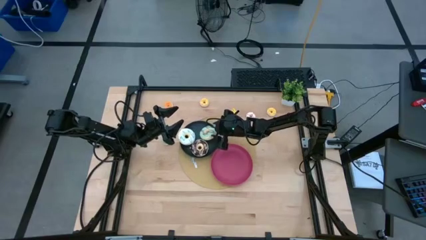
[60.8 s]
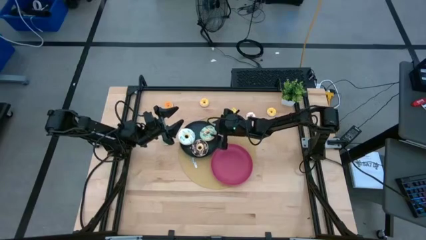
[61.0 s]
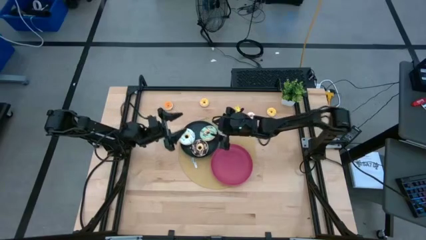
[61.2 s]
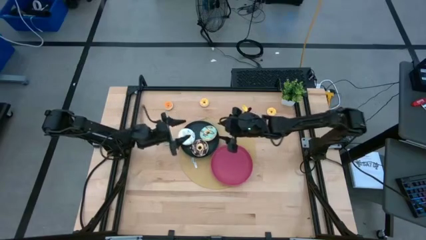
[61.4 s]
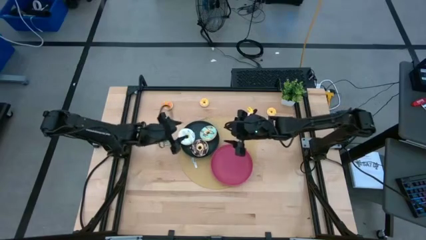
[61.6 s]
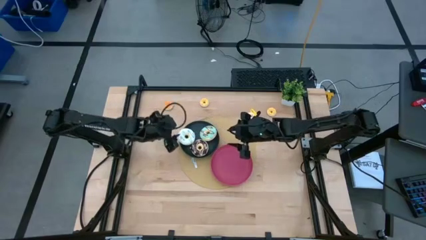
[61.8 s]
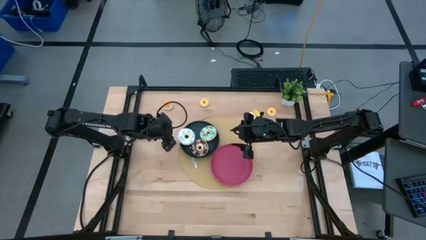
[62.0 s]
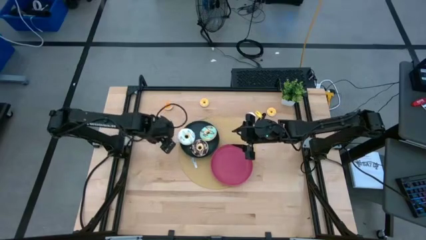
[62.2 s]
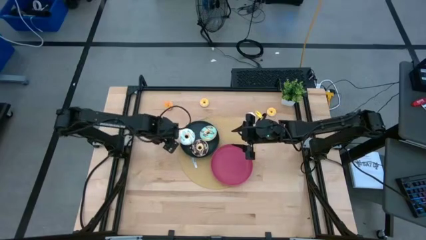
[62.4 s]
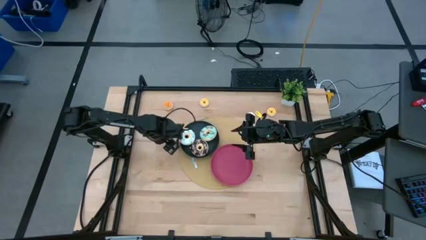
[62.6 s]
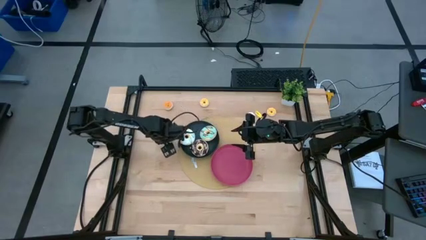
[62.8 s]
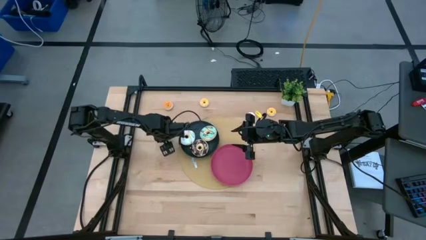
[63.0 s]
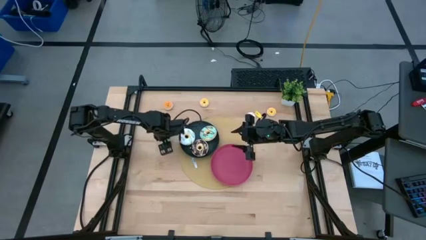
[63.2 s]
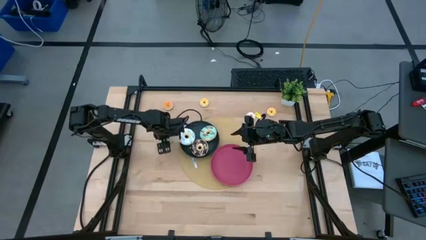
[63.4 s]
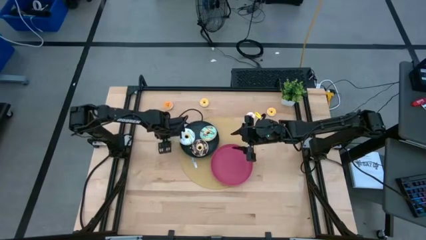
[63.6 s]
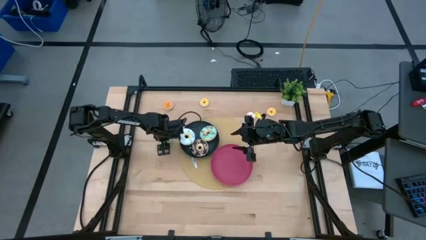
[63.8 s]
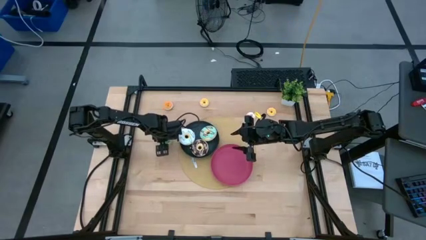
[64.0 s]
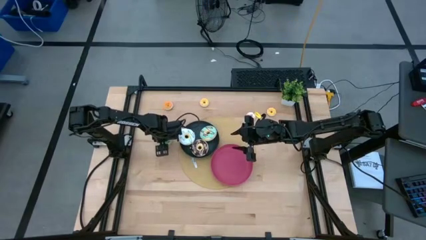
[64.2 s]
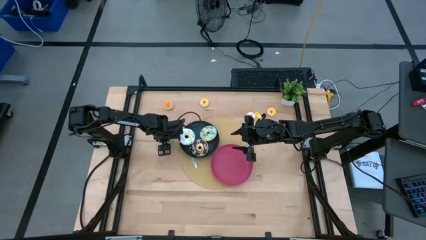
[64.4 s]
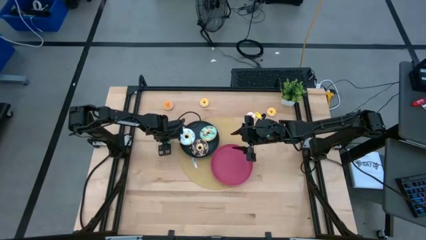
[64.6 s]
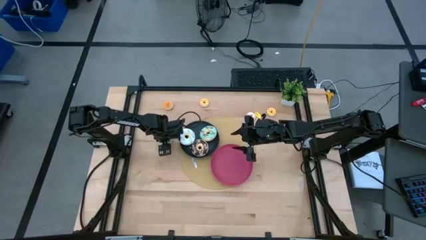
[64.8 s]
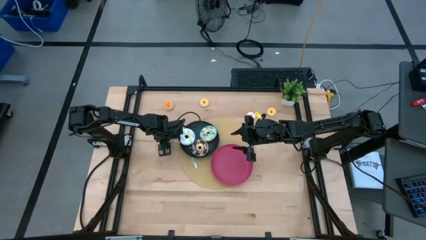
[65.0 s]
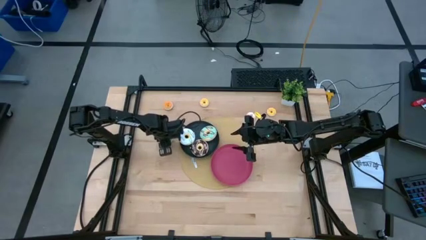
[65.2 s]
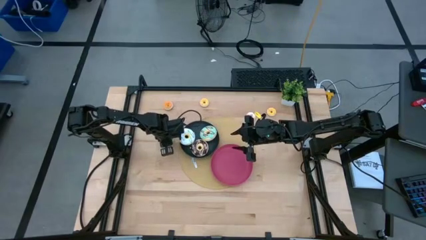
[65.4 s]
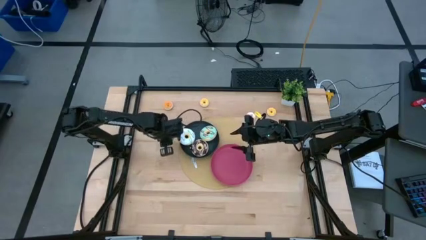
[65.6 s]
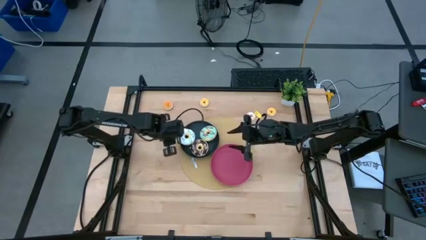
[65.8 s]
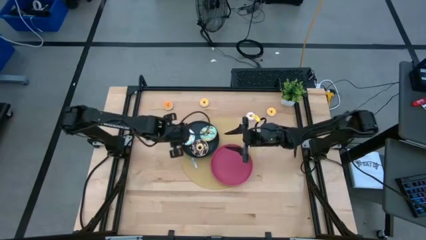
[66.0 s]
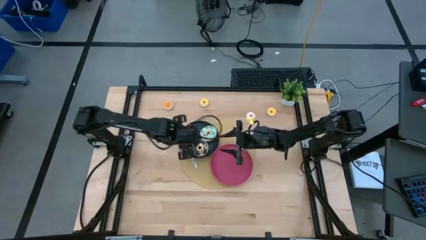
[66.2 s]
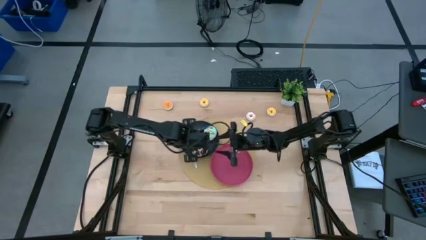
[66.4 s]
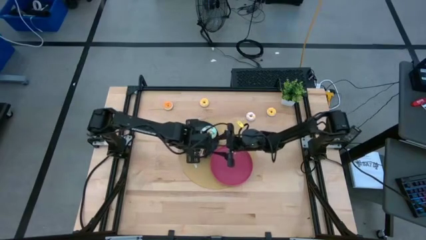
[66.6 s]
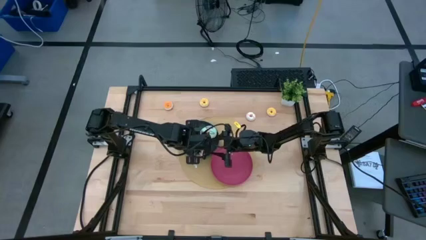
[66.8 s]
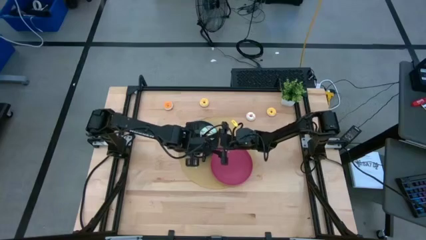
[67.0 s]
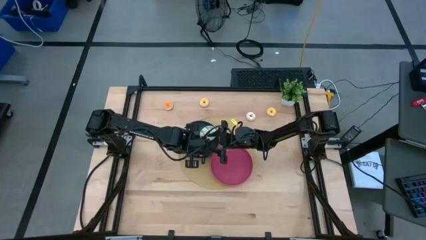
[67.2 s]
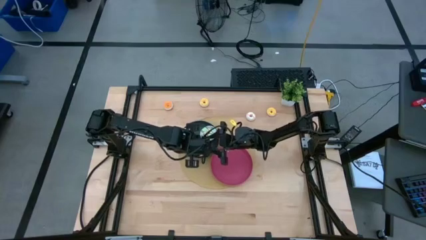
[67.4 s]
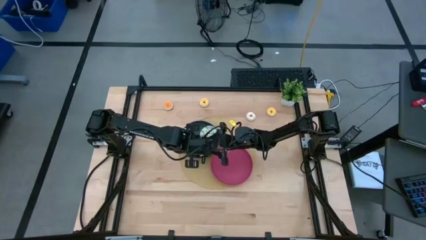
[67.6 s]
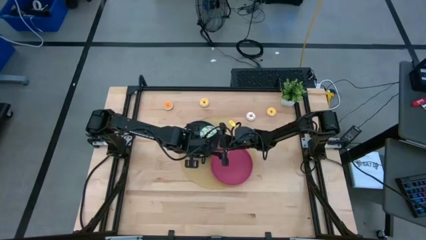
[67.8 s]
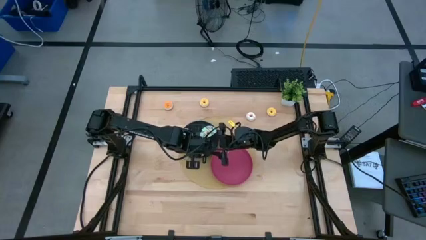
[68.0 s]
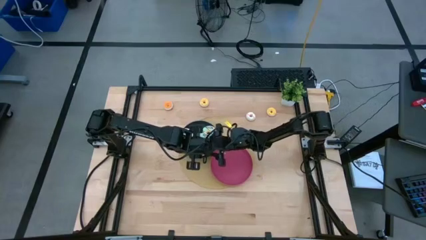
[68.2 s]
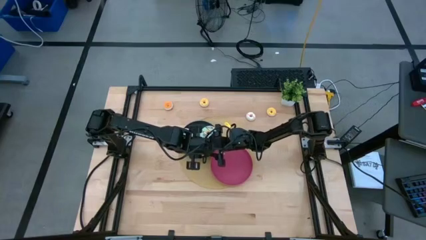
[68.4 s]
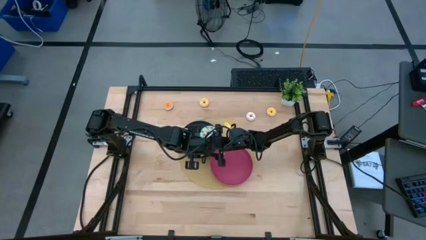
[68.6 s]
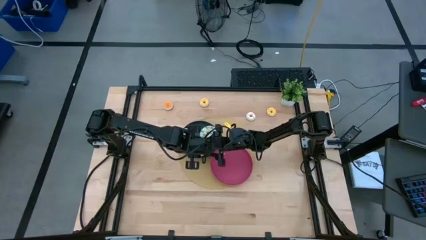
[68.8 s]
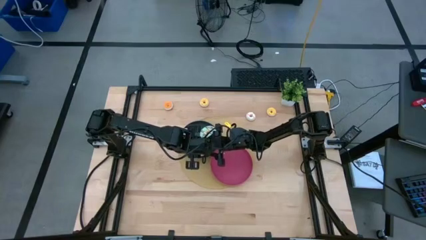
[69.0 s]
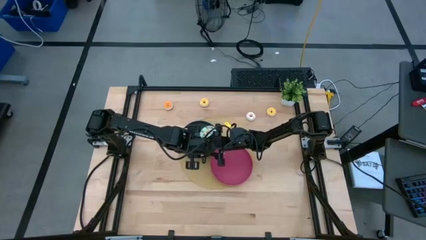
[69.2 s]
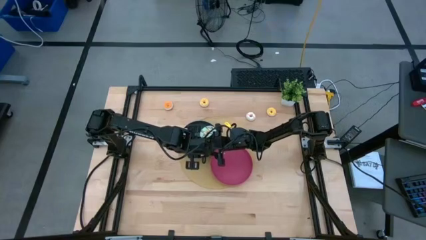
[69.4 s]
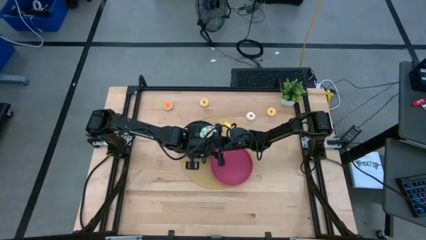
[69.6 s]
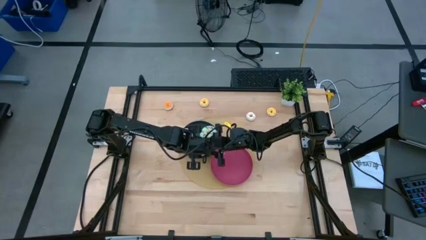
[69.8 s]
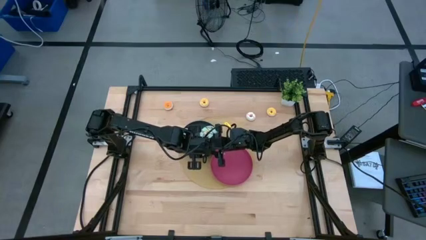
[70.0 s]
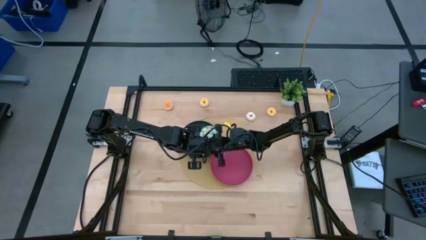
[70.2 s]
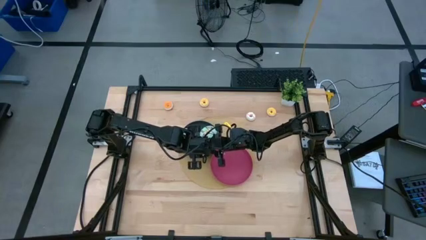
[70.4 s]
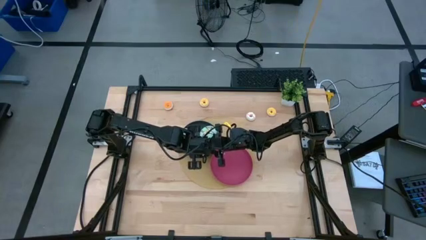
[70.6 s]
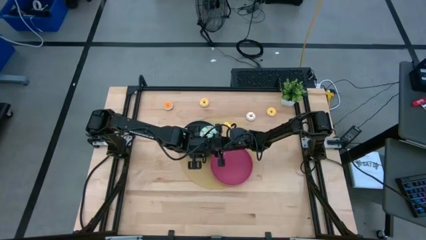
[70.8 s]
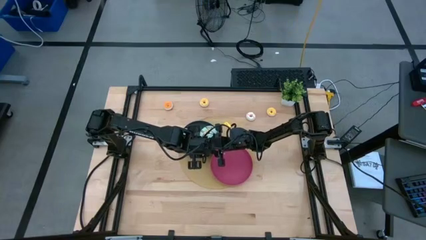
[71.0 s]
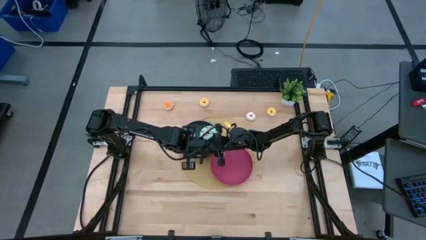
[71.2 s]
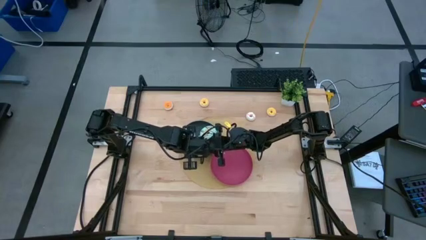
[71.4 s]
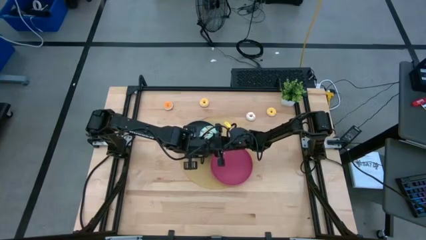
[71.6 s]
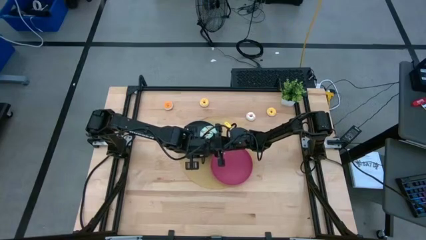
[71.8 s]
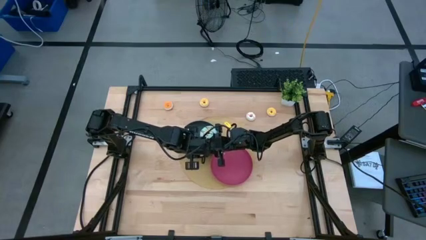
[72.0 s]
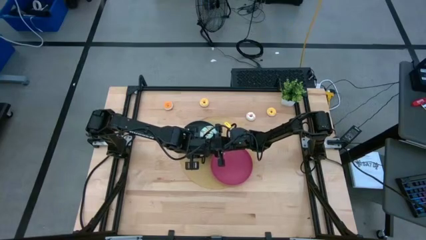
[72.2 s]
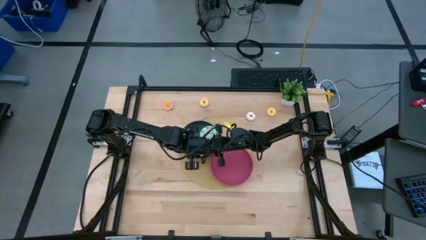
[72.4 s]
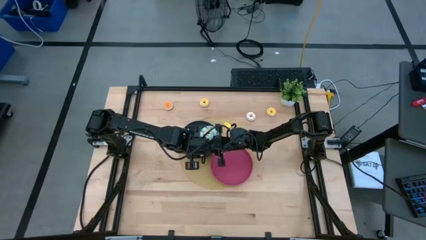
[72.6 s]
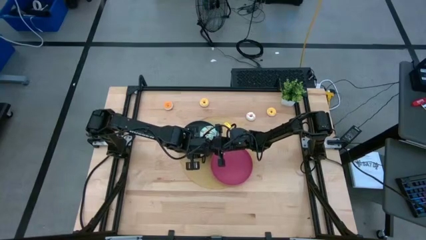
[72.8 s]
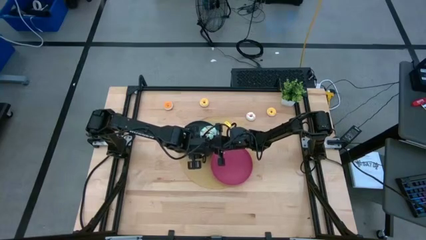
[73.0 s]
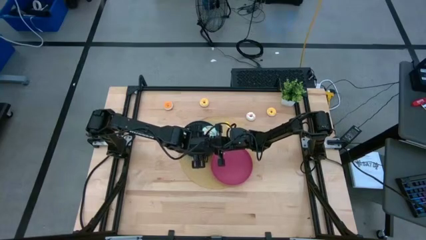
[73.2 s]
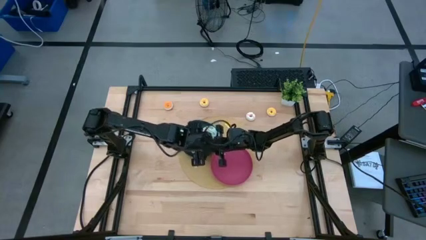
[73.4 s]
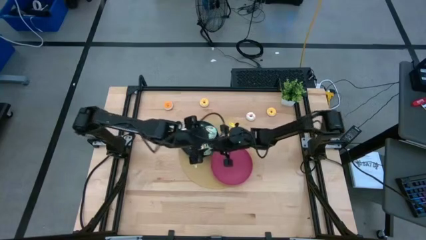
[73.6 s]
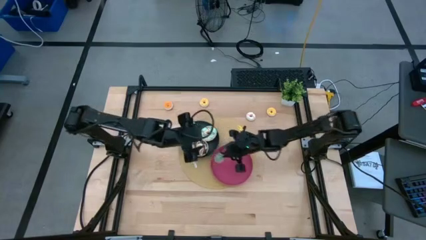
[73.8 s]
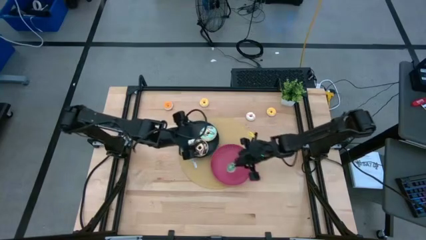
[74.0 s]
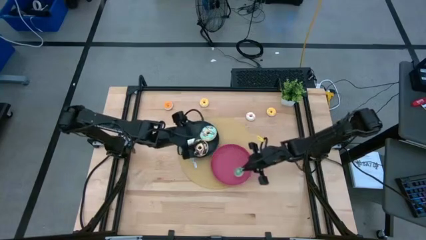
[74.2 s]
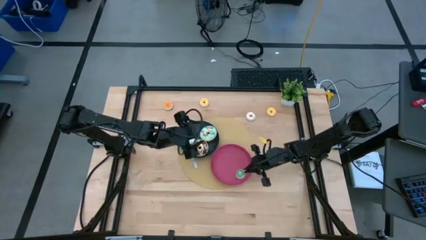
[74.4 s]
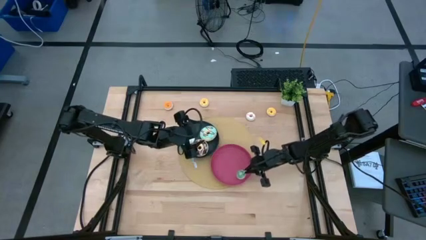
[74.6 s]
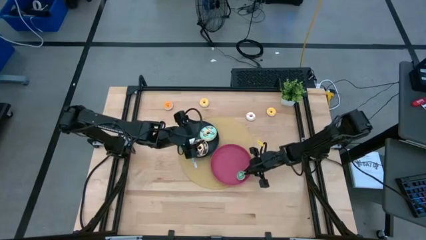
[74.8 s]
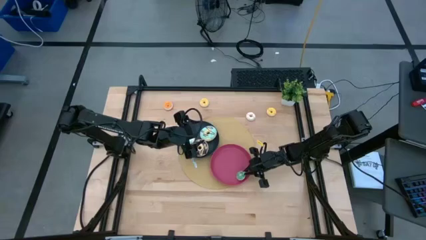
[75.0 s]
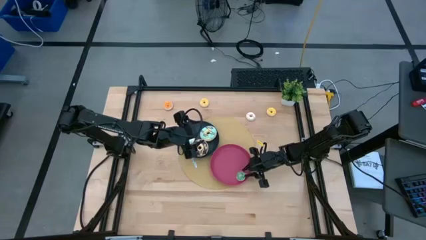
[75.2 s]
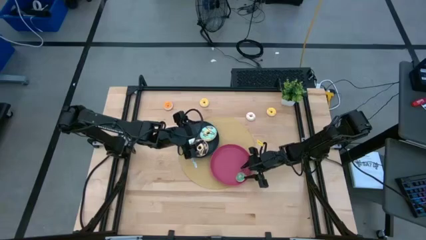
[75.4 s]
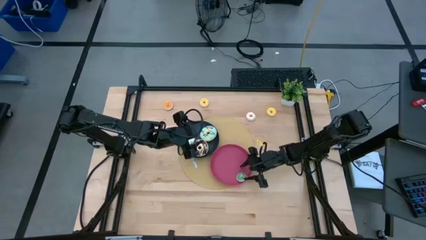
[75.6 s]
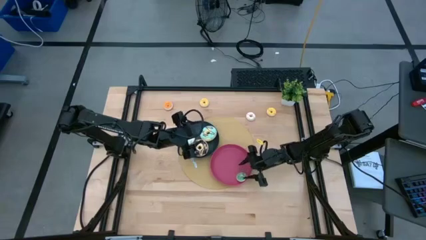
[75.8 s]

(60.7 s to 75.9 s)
Task: Pick & Place donuts
Put the small green donut on the pink plate
